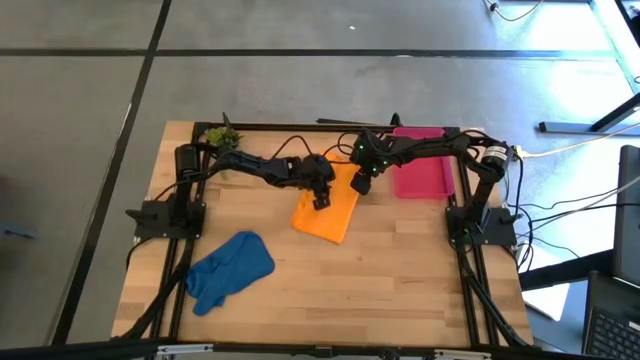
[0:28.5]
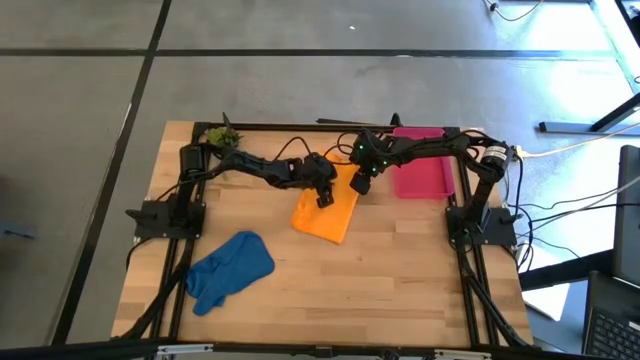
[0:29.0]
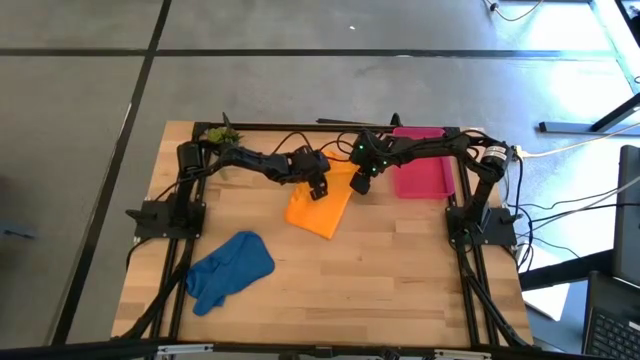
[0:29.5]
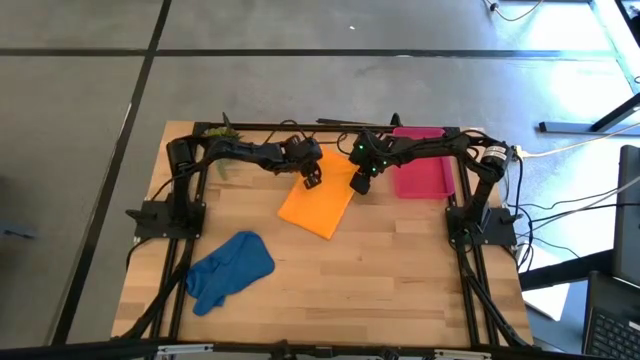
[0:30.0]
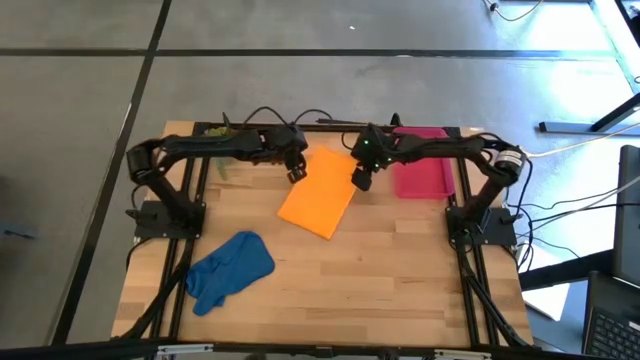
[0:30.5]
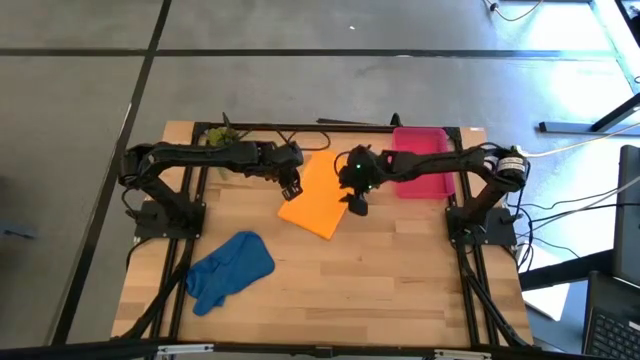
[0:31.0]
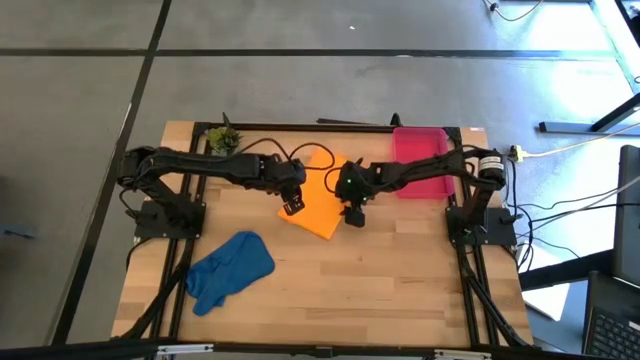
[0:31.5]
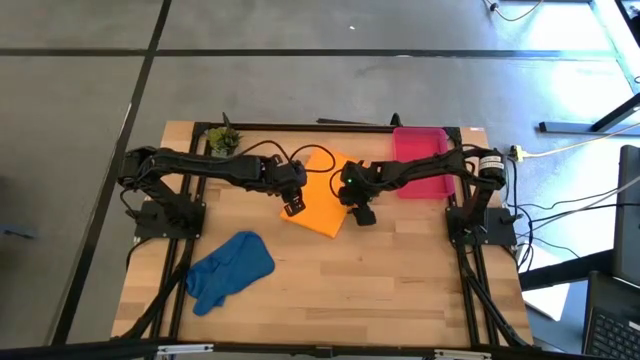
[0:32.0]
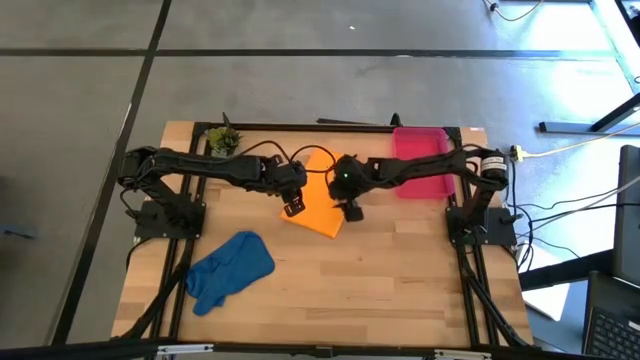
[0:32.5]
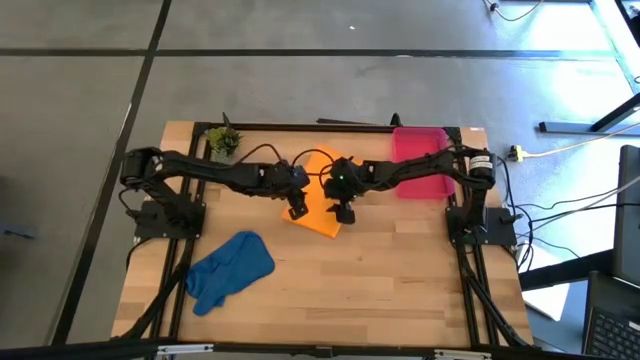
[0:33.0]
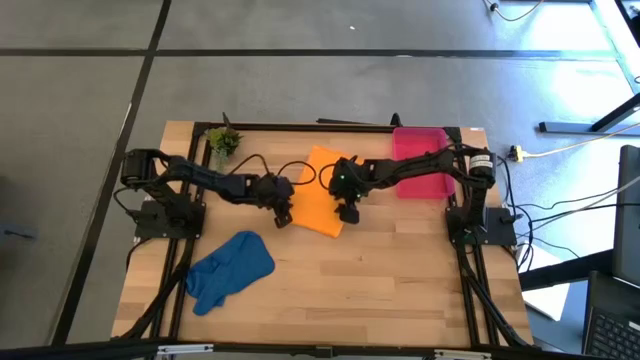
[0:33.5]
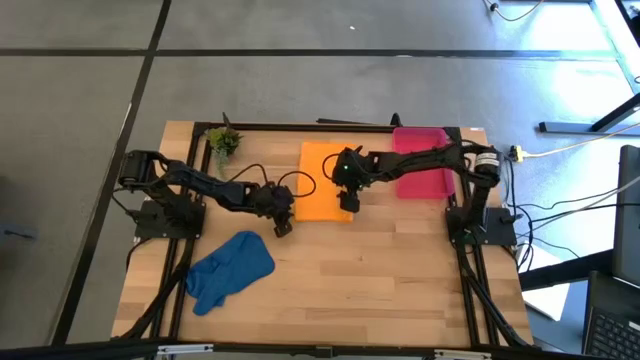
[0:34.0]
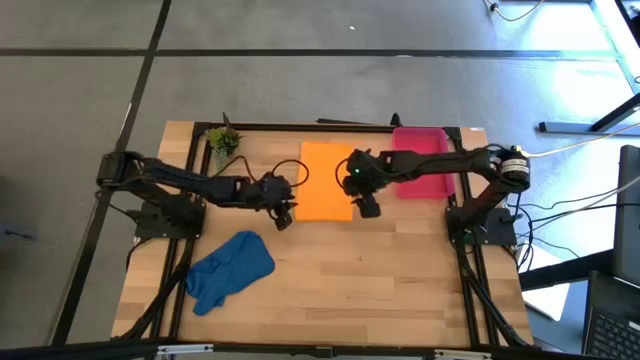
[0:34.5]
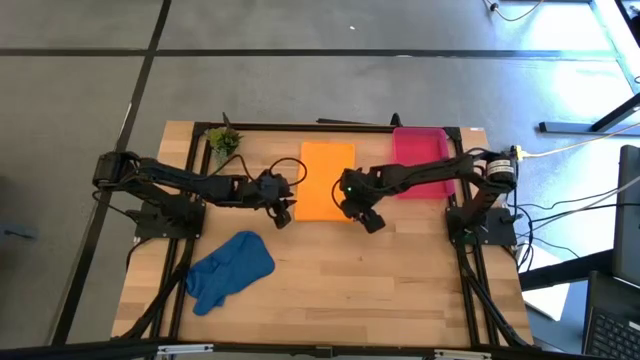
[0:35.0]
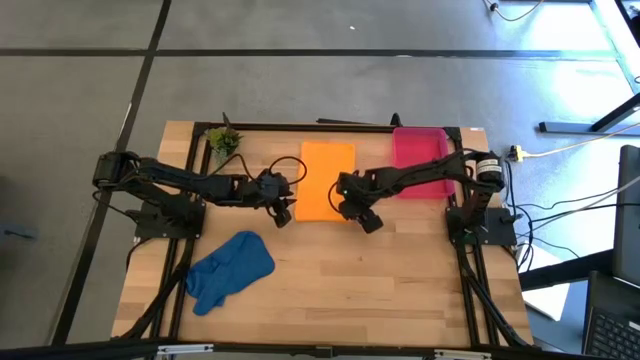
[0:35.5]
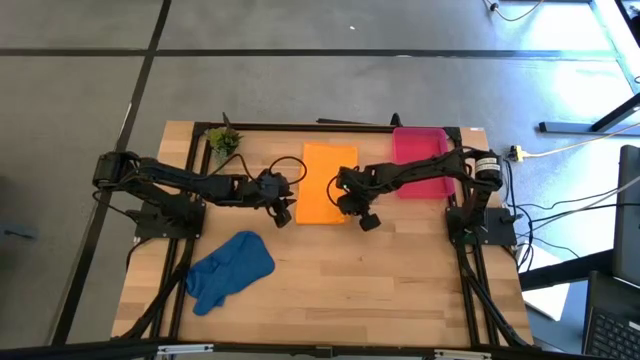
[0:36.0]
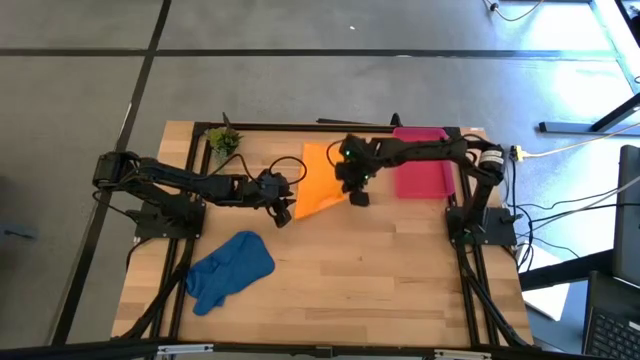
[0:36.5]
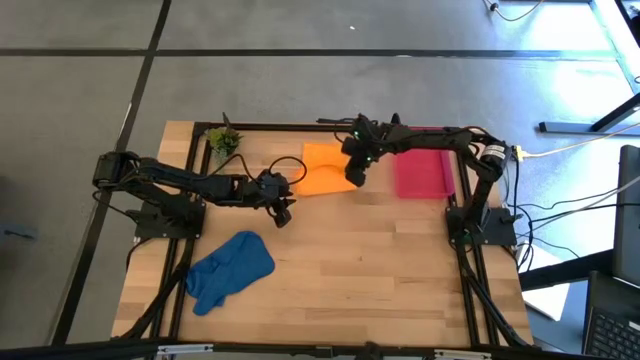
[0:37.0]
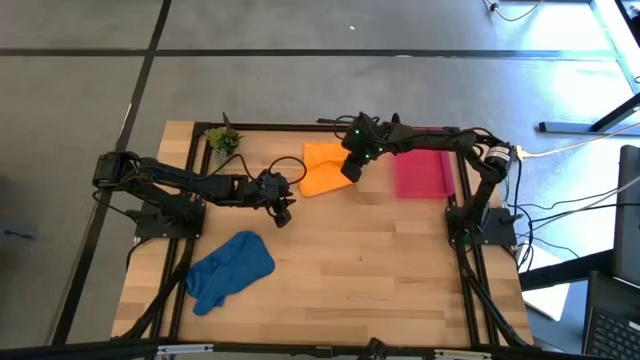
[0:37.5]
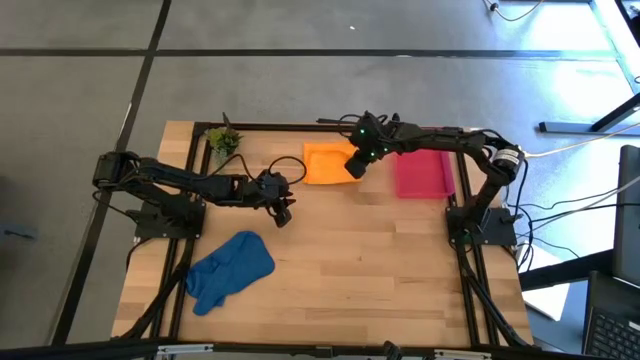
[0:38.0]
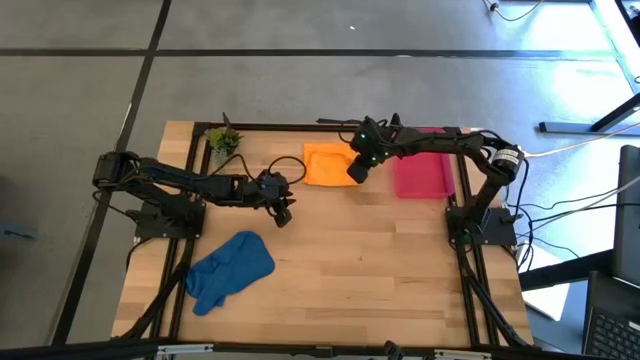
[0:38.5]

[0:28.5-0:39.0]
Task: Roll microfiber towels into tight, uniform cylinder then place into a basket
Fold the orange microfiber towel

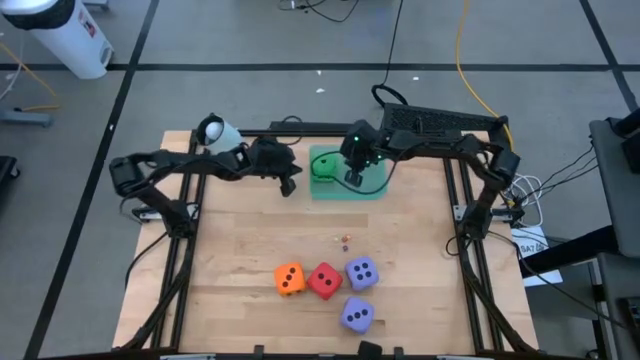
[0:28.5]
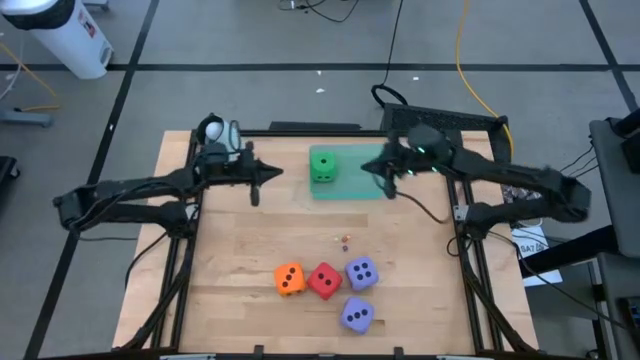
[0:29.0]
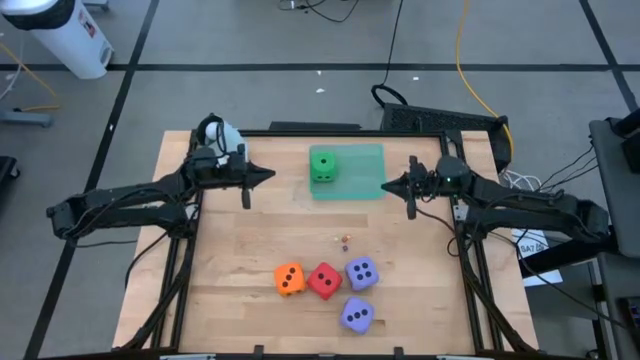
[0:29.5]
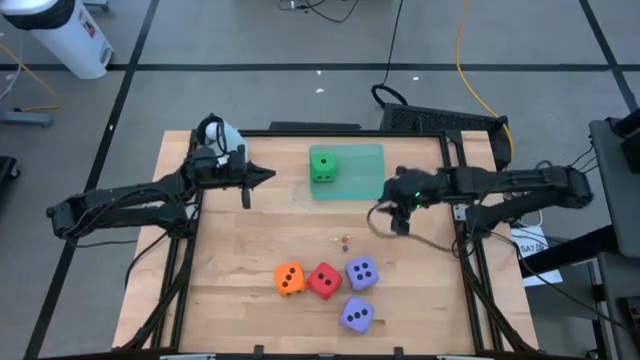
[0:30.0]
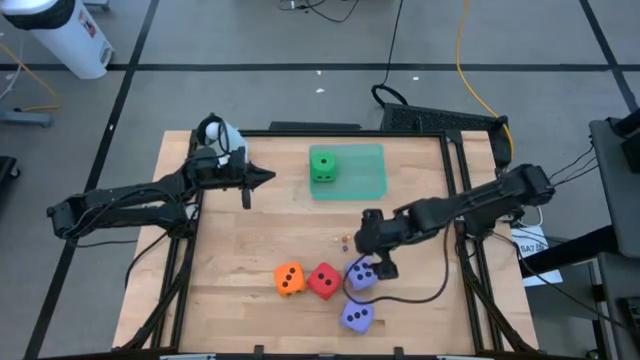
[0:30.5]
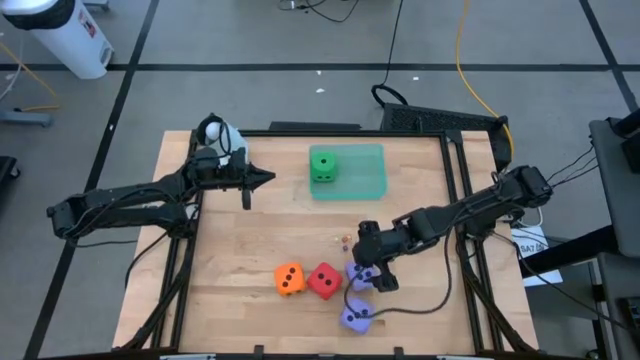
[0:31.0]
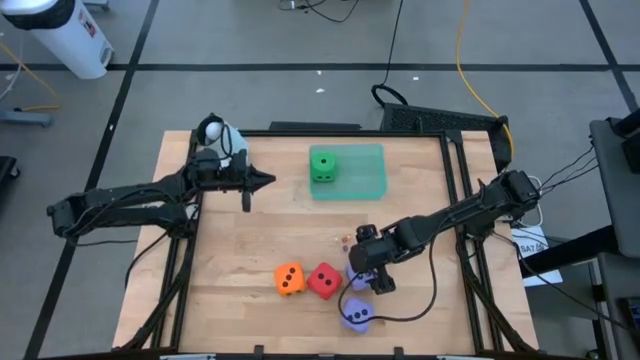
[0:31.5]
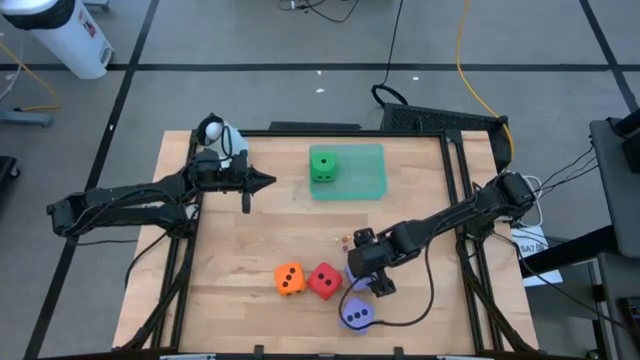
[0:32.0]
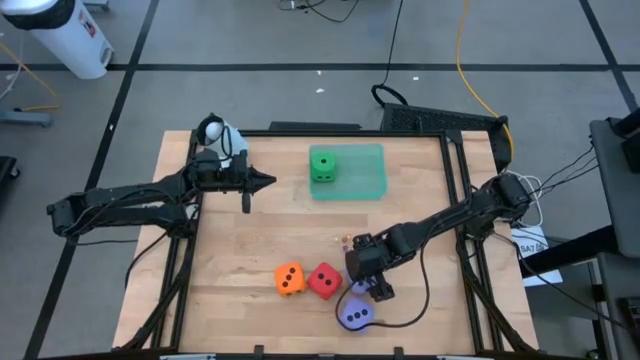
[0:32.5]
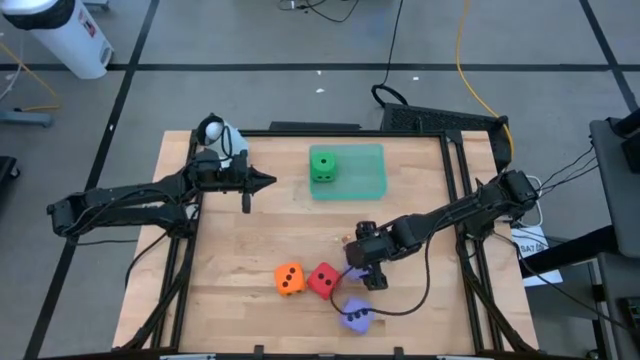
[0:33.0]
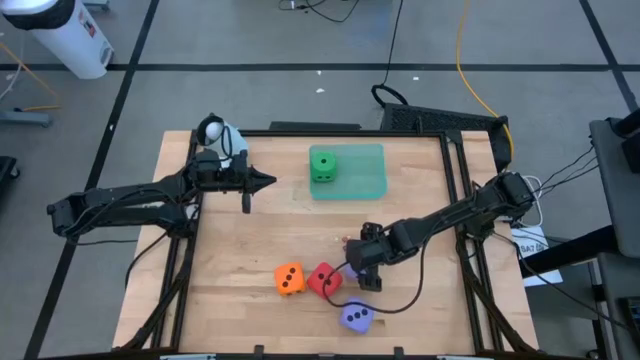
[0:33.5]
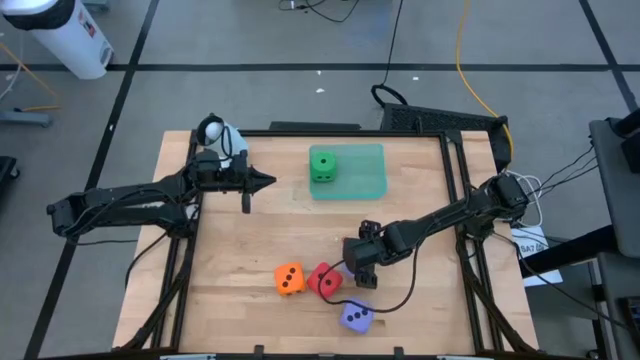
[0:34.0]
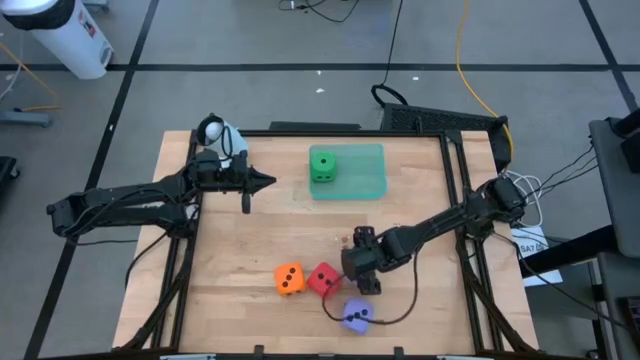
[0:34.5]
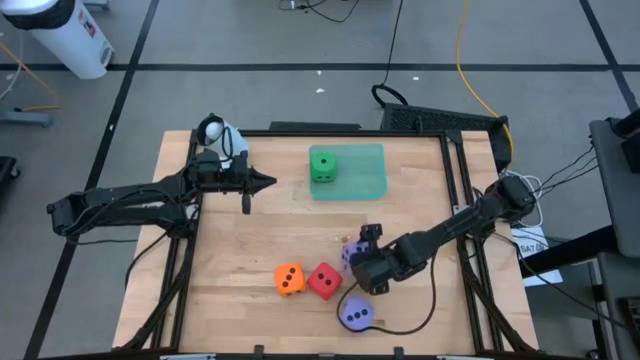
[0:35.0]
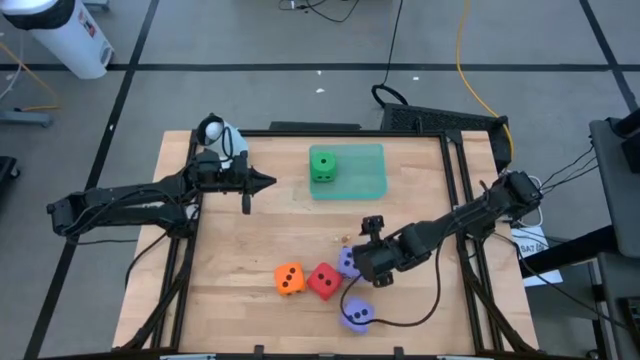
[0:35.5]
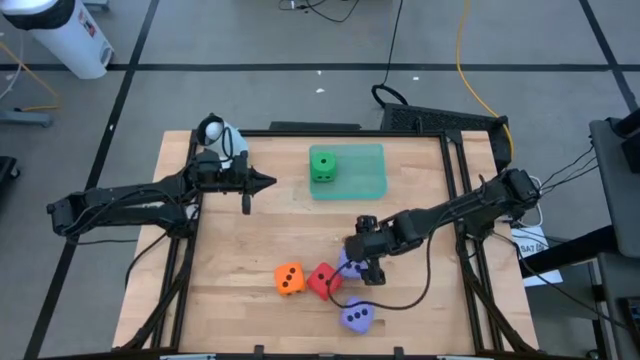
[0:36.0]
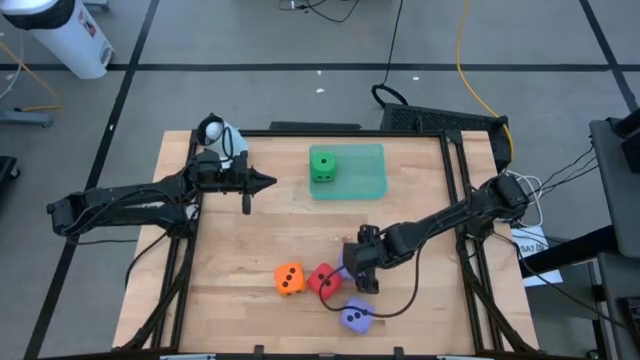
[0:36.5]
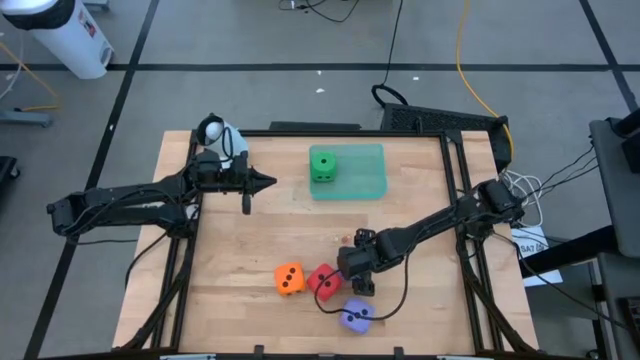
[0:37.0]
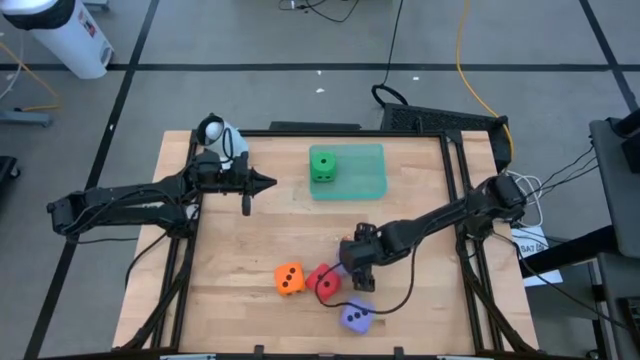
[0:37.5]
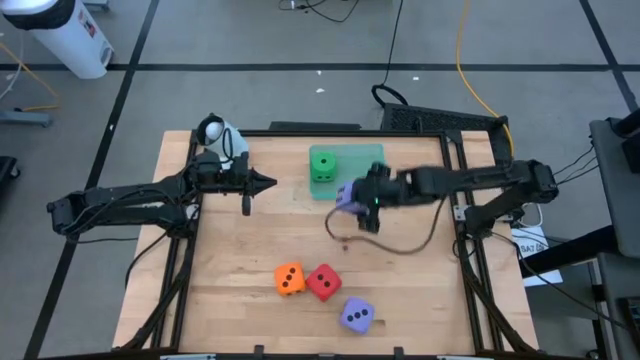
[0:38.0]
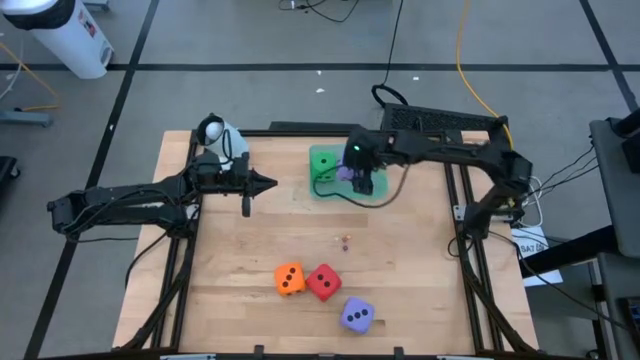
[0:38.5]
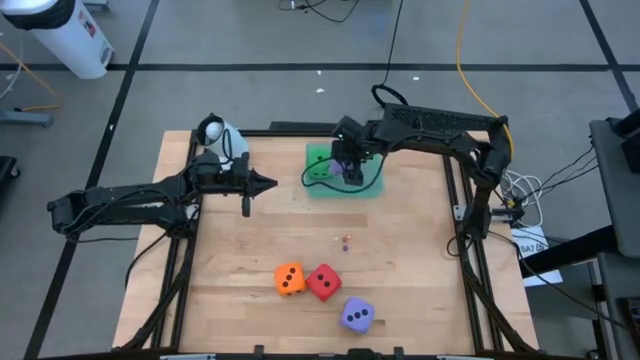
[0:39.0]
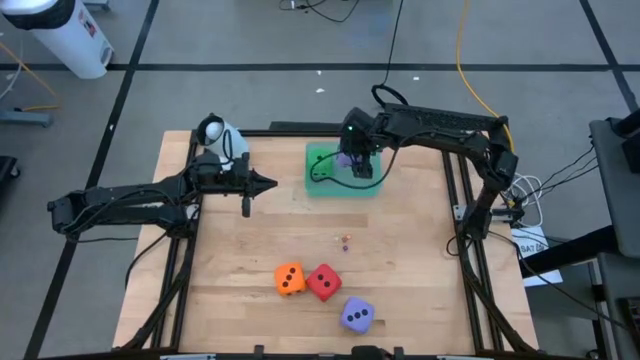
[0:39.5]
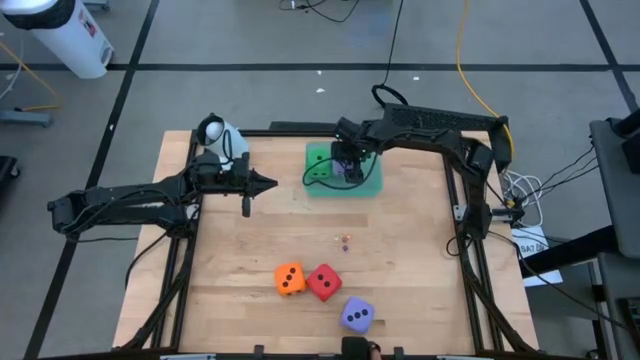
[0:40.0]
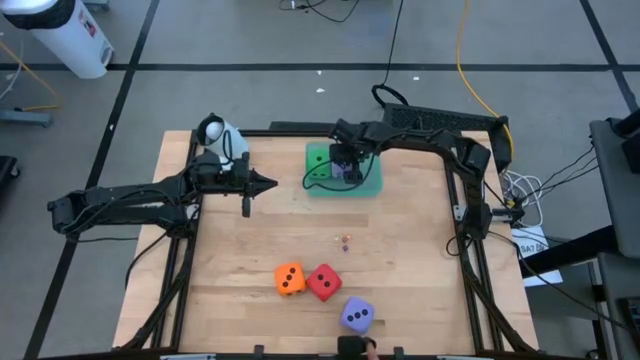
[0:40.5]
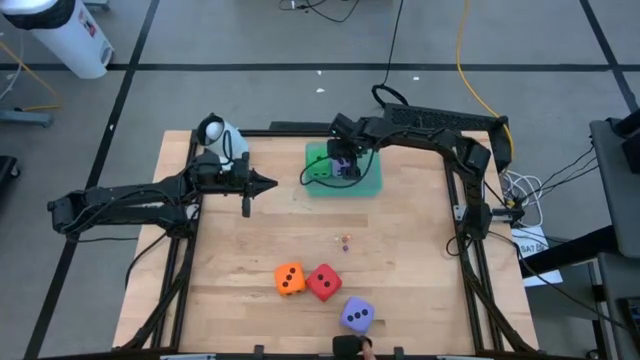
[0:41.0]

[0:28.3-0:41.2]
Task: Pick & Place Dice
Put the top large purple dice into the blue bin
